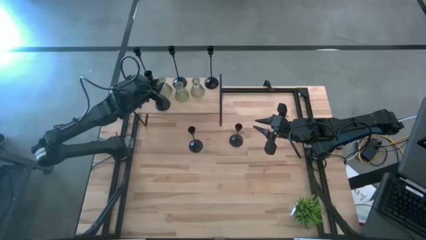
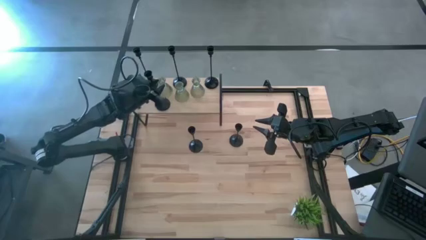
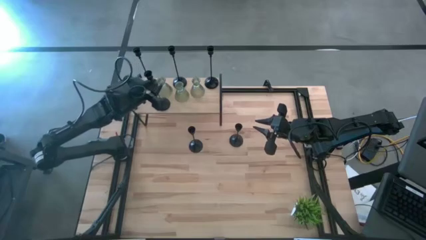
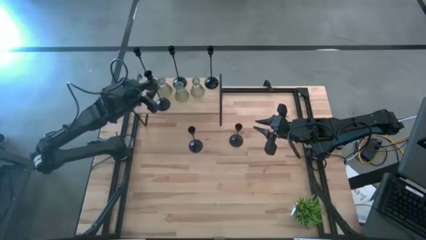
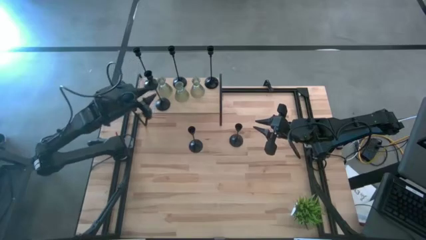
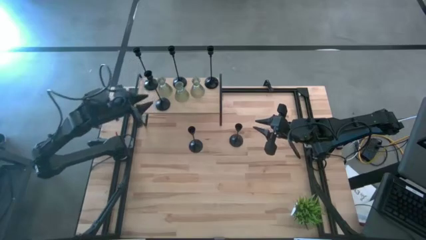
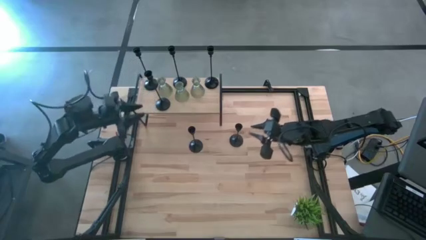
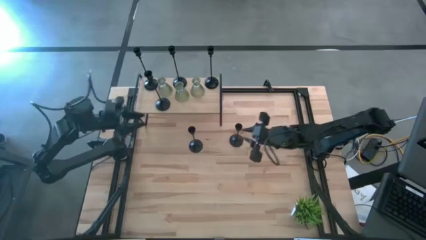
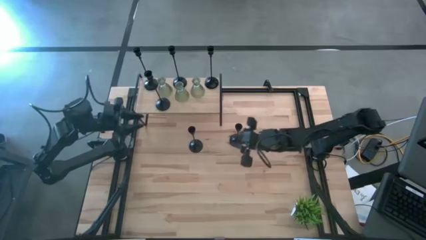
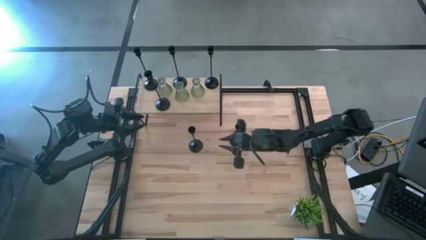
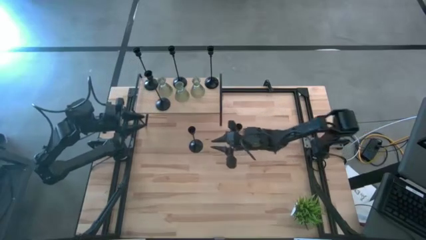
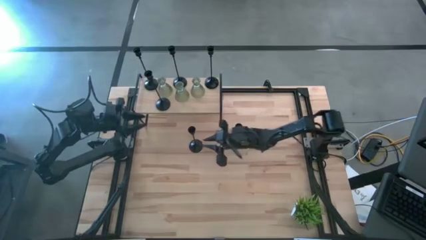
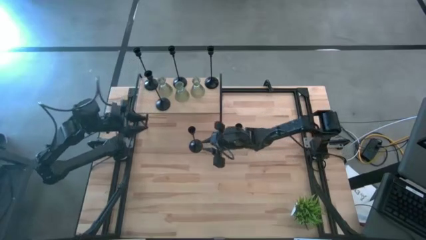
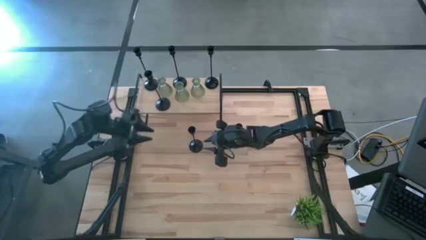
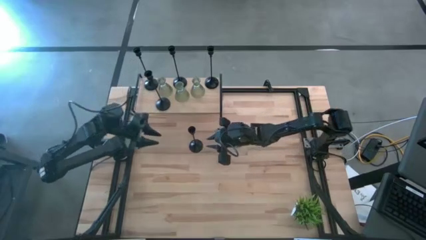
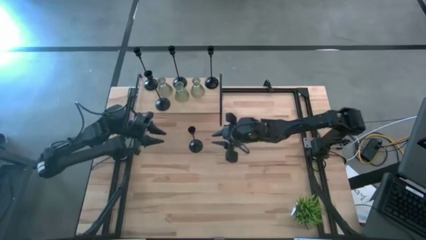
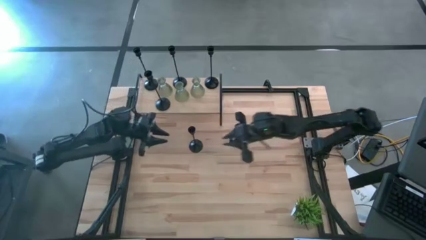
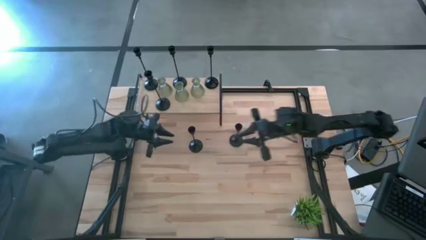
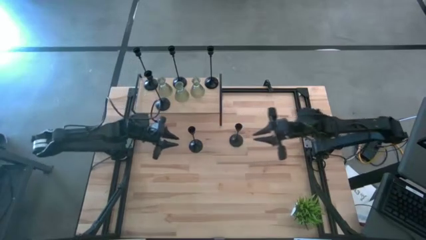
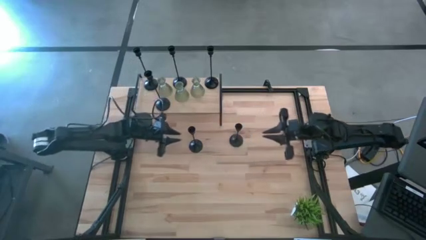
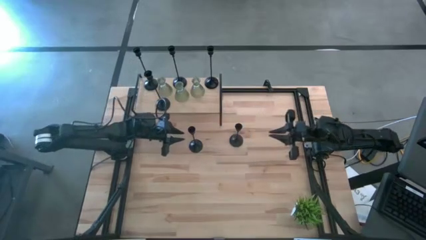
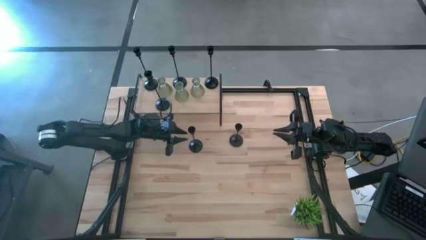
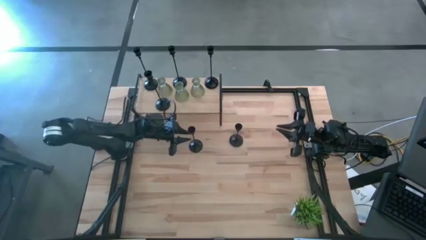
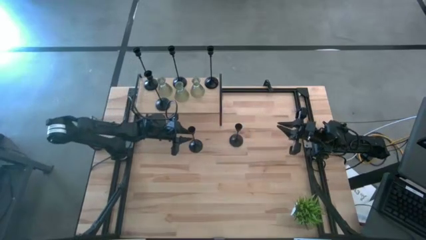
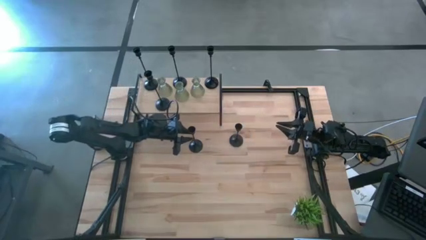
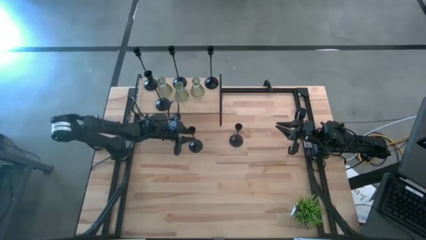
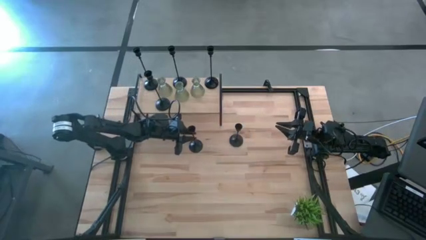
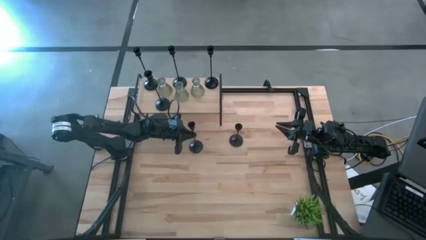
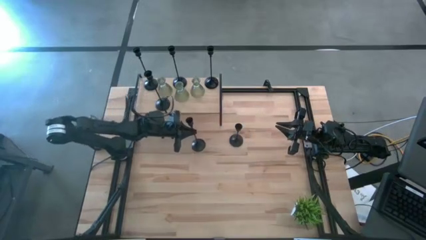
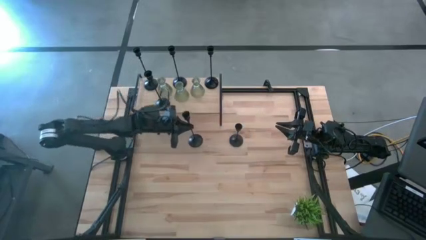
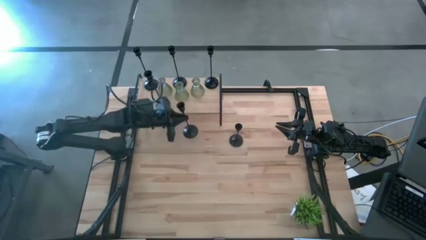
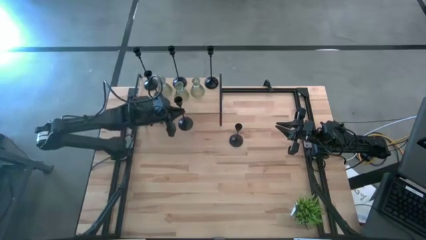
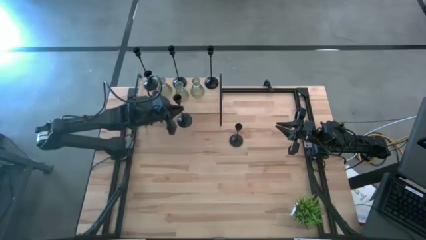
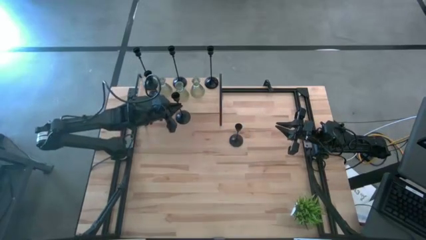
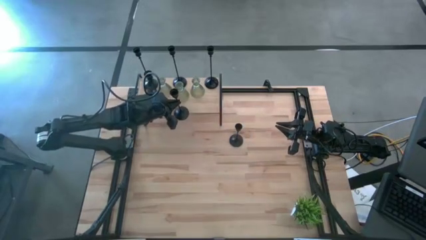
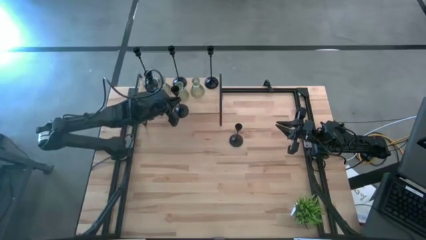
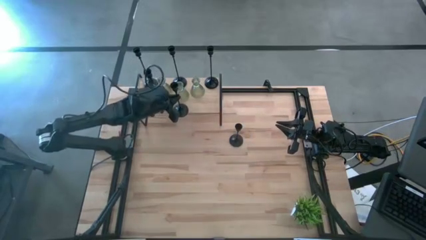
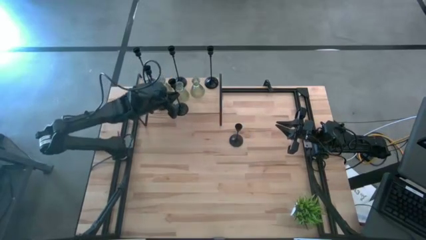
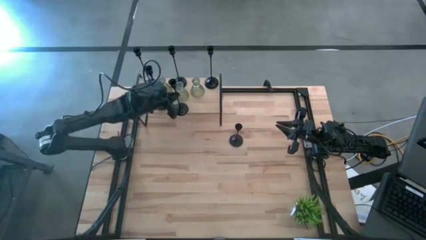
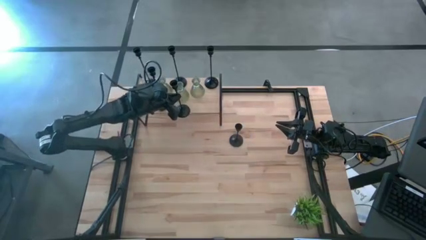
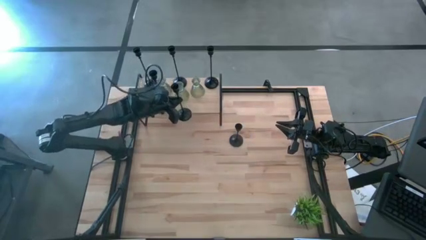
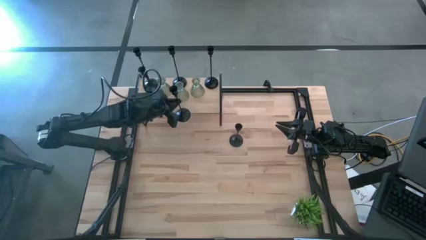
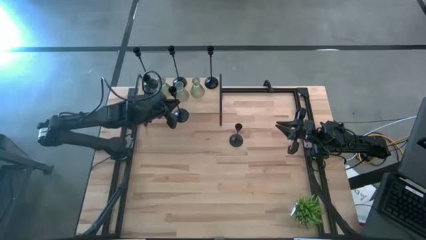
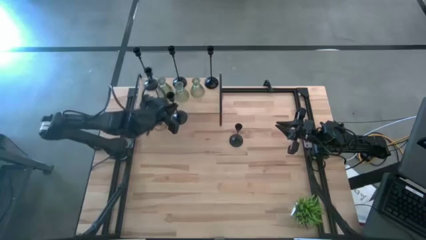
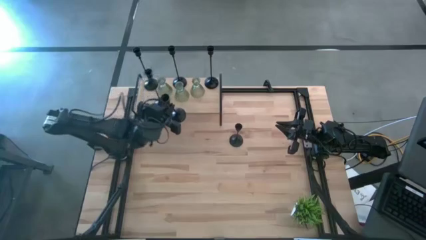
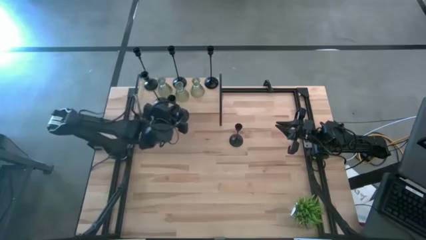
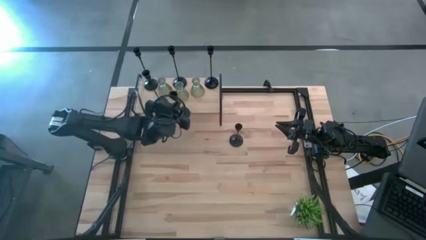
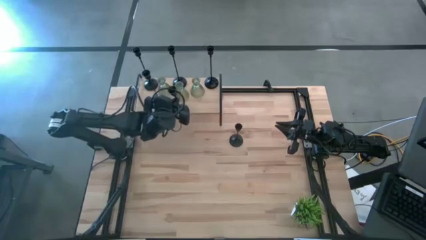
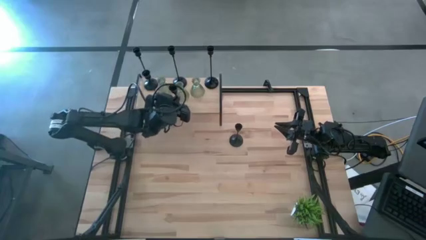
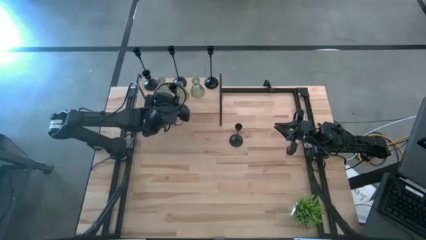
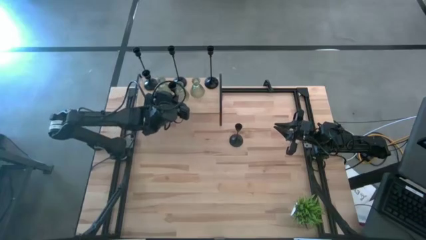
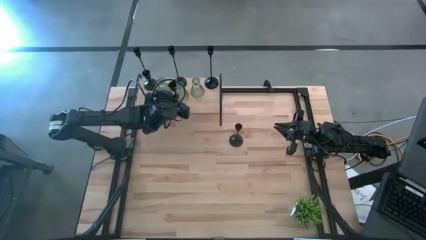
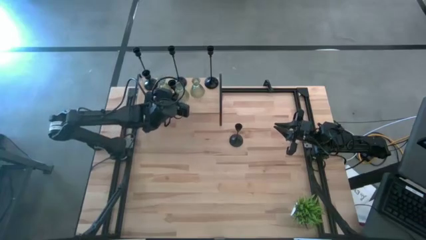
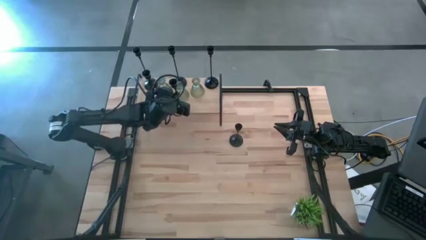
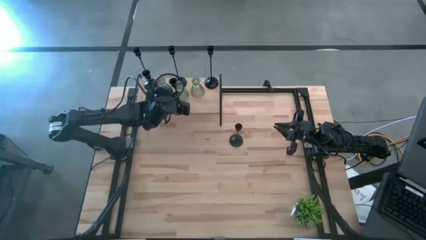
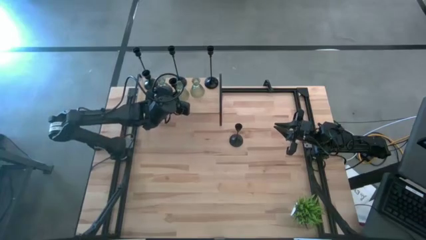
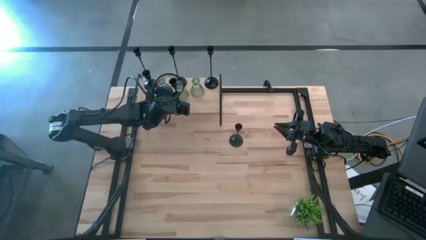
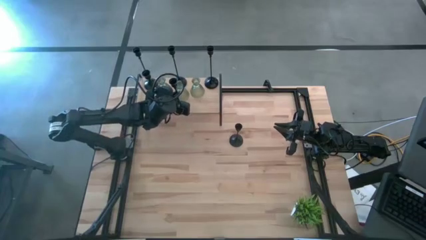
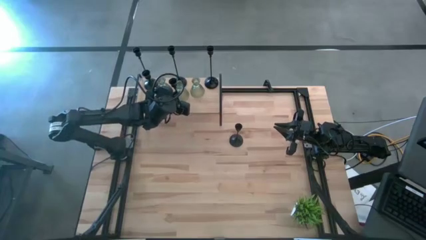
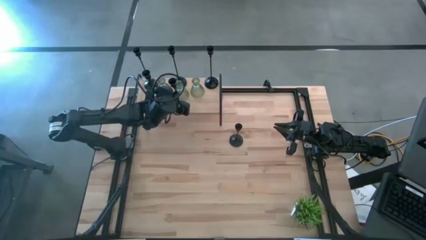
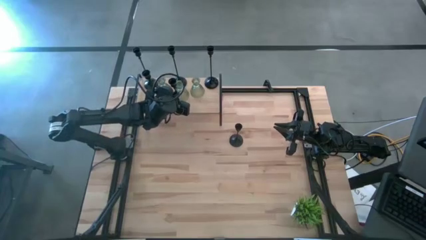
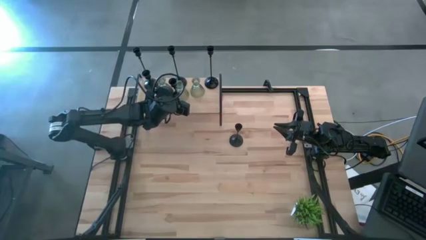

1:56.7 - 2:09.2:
Task: Pick & Place candle stick holders
Put the small black candle holder on the shelf

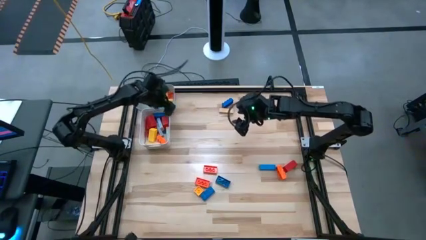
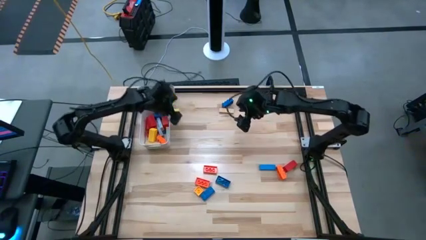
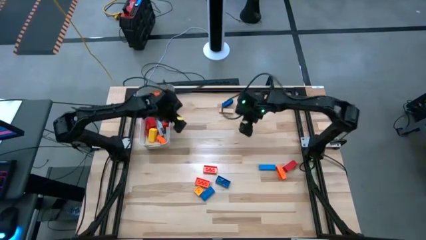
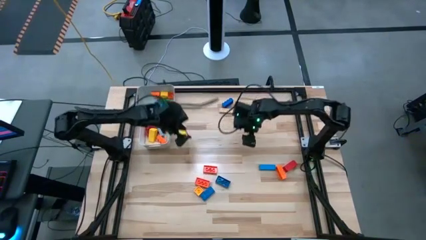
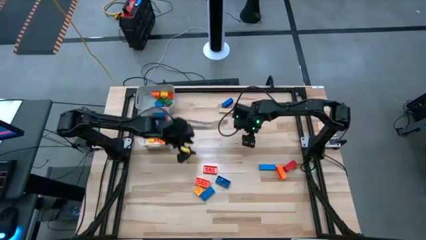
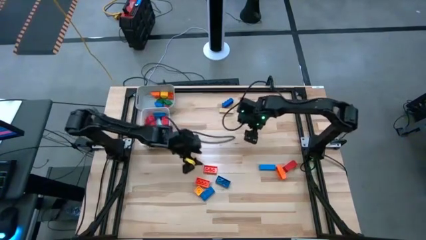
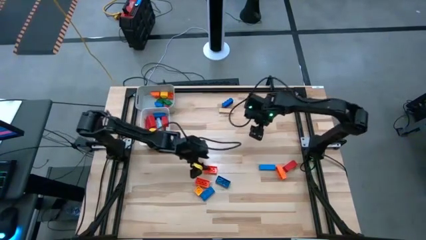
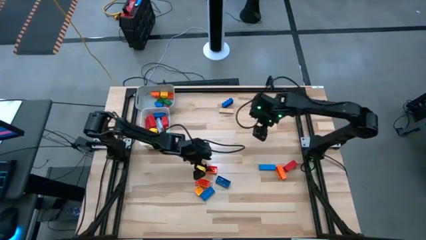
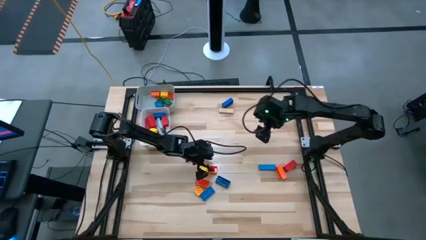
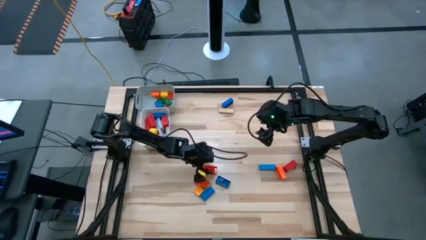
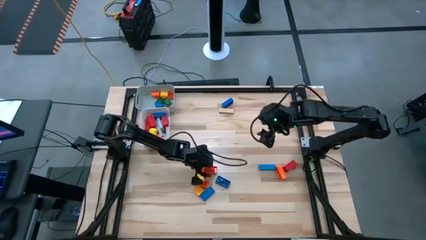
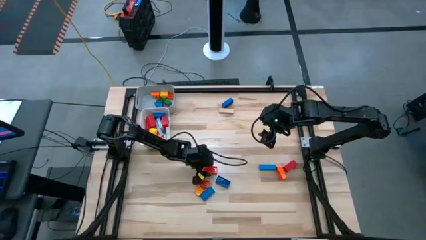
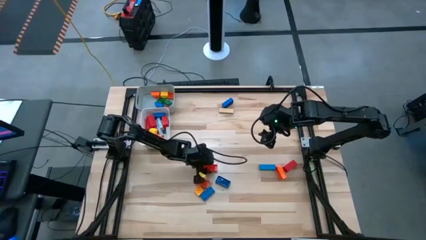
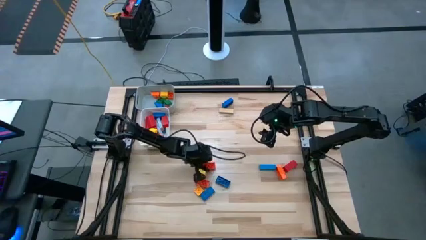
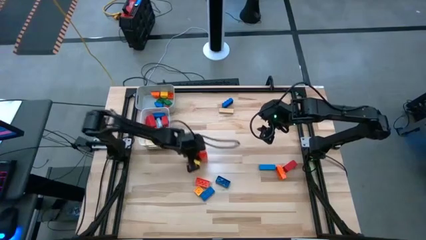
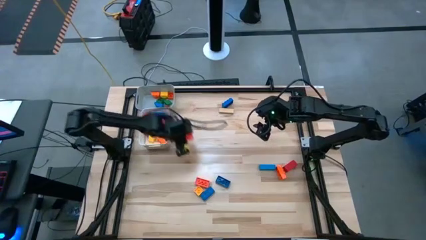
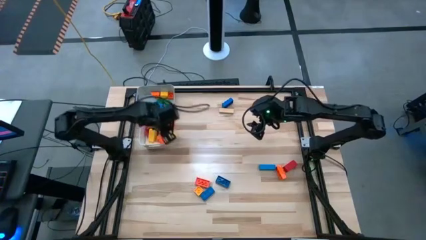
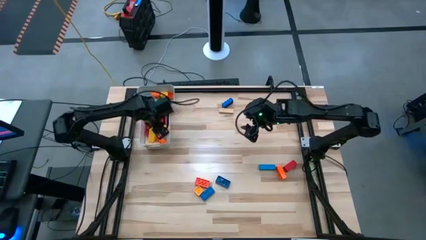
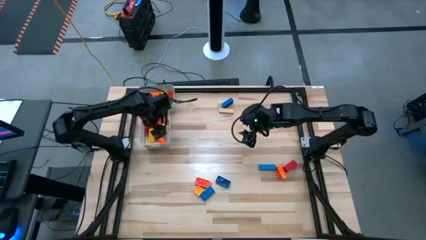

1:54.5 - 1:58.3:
Task: Sort blocks by size
Put the large orange game piece into the white bin

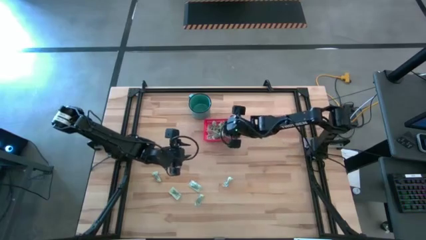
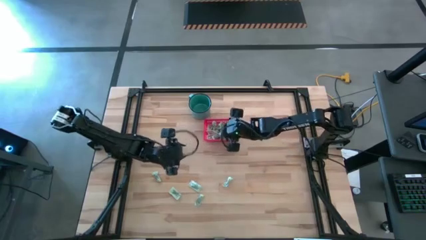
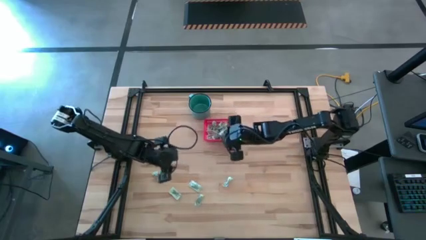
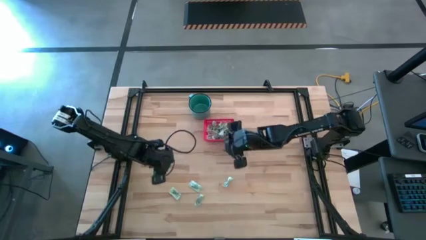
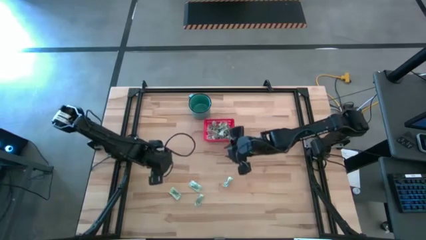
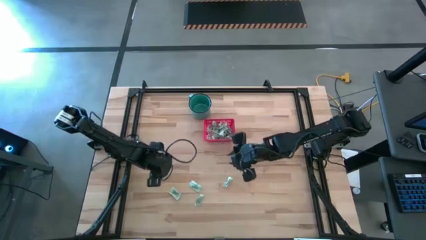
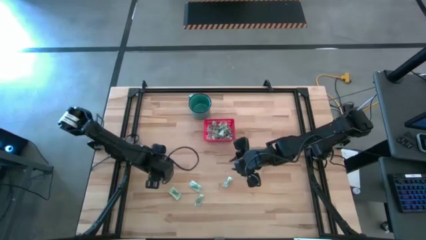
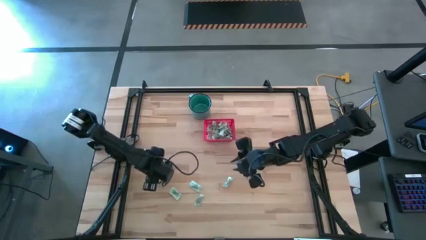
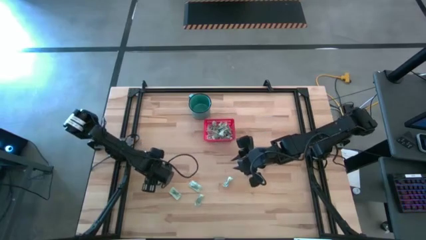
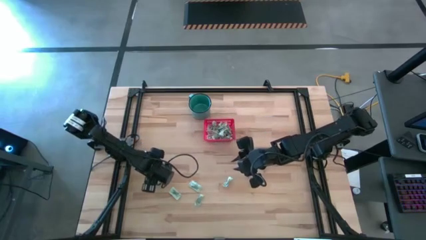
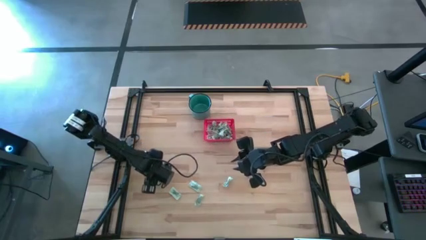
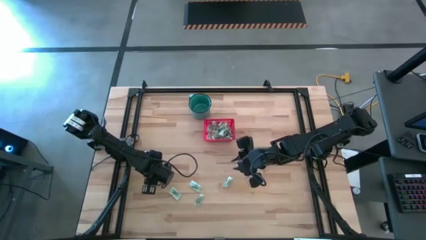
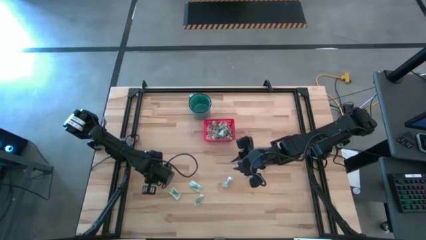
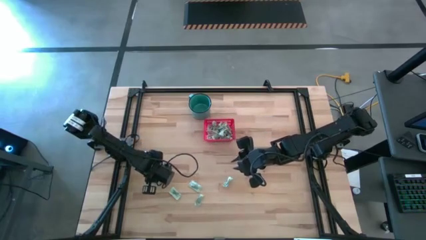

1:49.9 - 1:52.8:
Task: Pick and place items into bin
Put the light green stevia packet into the red bin
